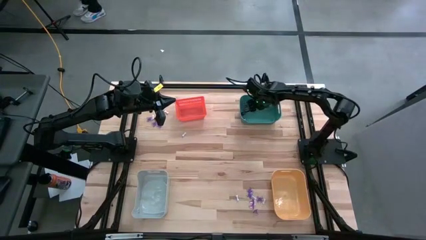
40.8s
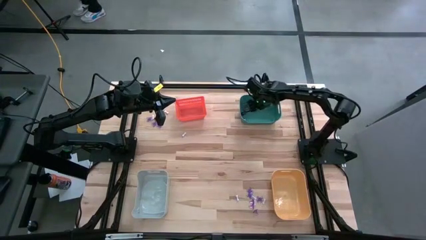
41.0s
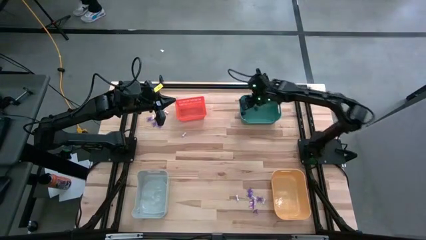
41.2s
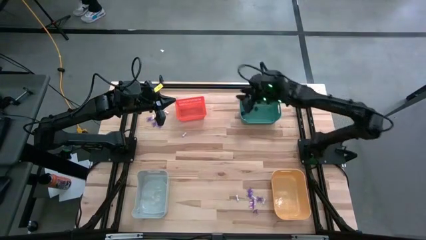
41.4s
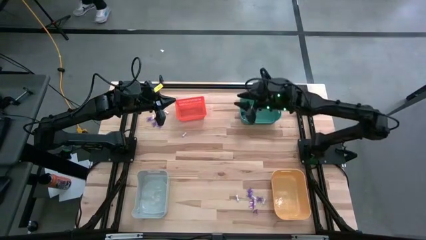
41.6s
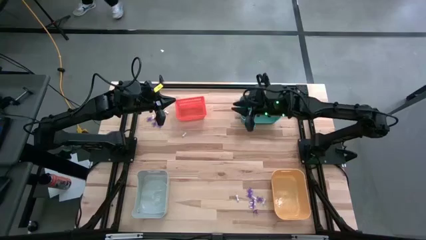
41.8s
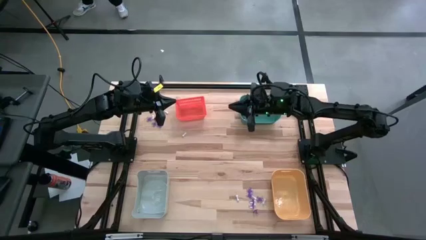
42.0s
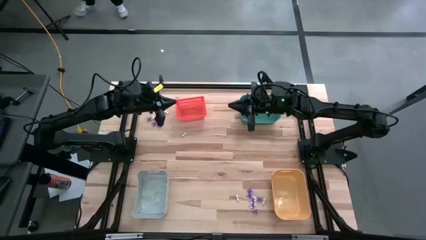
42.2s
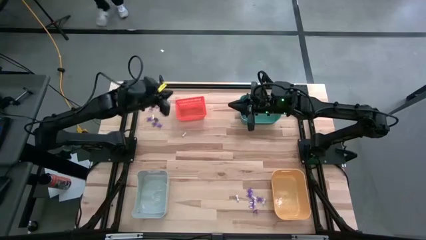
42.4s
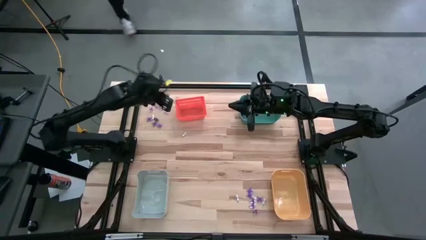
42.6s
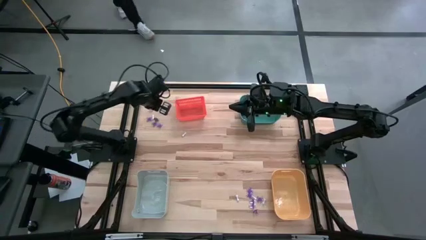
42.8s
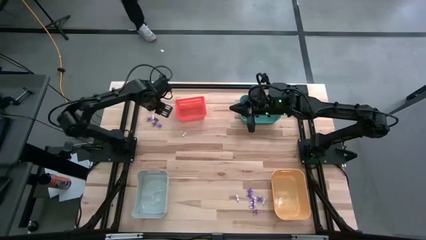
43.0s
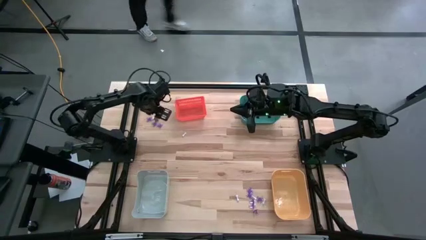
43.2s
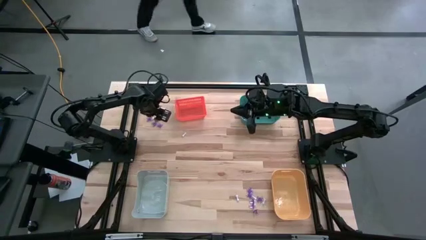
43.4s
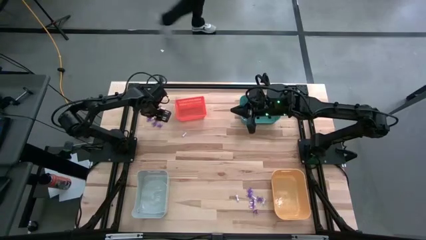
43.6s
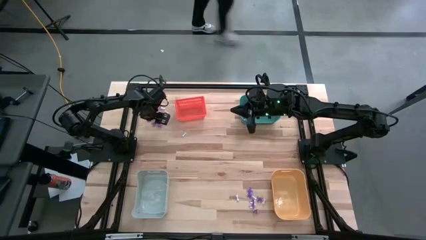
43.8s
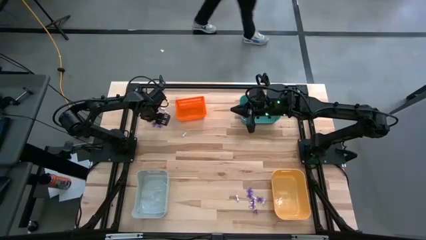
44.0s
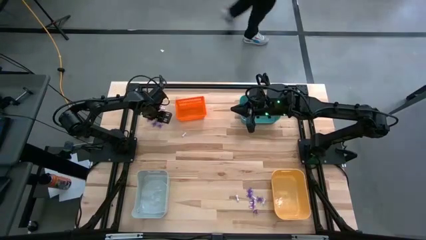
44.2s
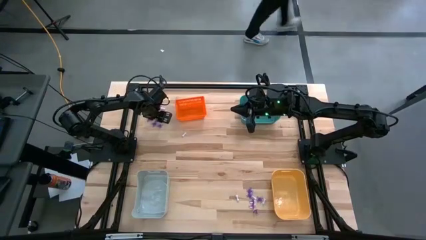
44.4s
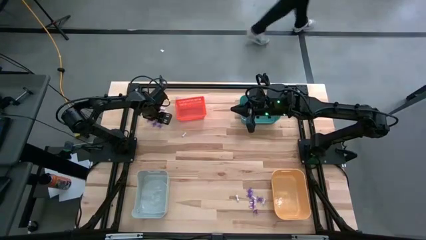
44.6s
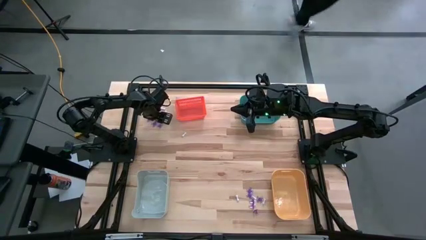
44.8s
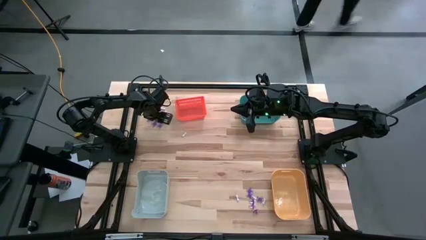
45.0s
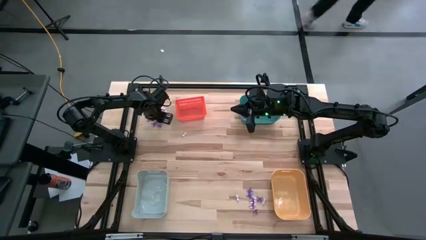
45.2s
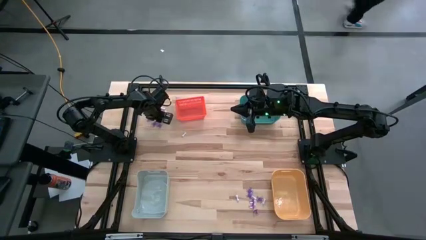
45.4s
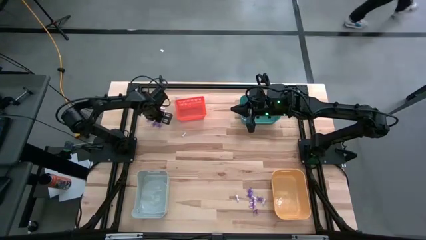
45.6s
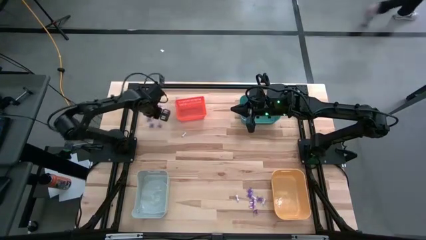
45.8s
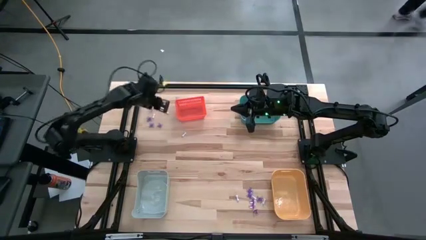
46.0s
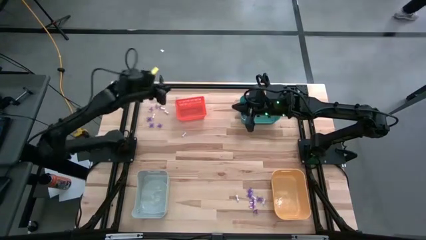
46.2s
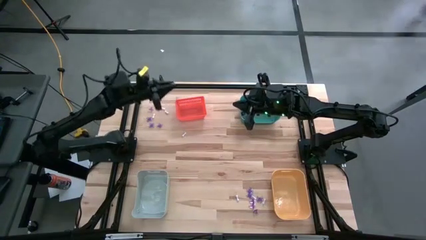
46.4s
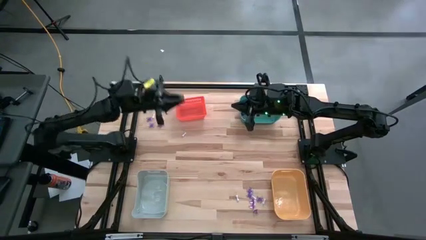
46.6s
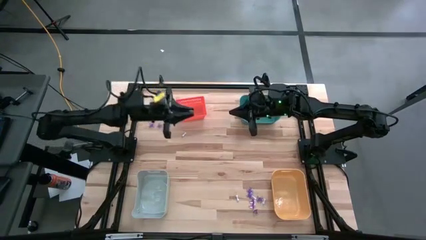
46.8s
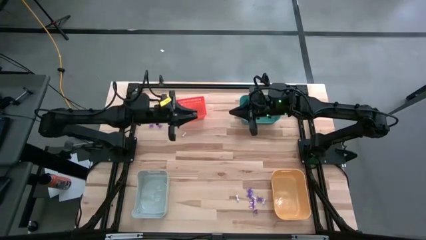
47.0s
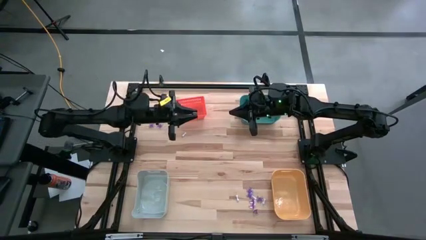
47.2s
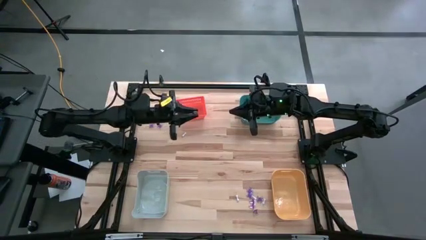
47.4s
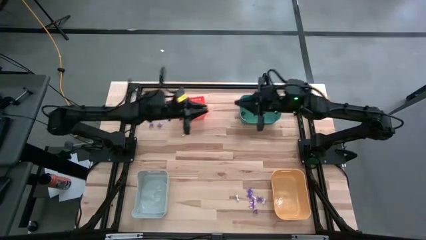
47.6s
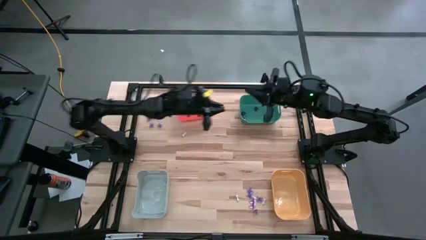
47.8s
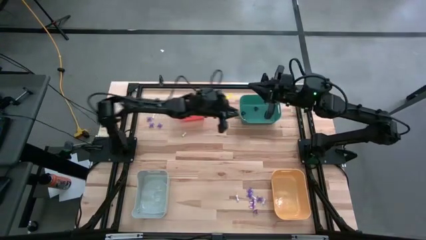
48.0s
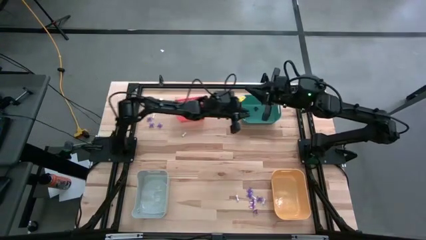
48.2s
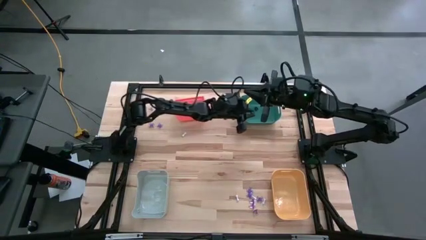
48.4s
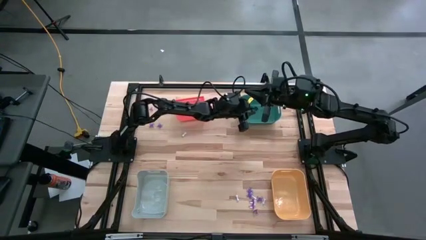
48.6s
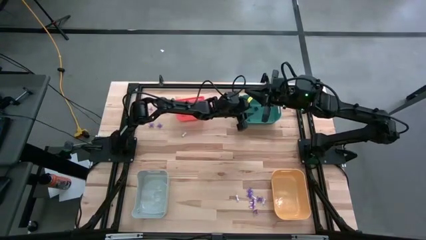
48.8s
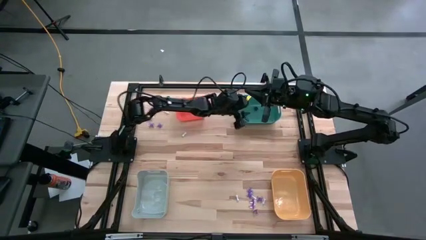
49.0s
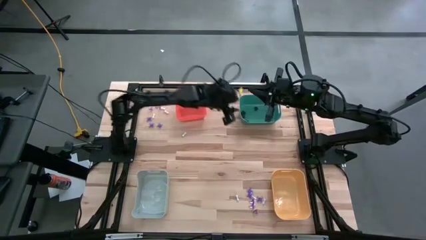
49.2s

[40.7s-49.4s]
Task: Sort Halloween decoration
Put the black skull toy into the green bin

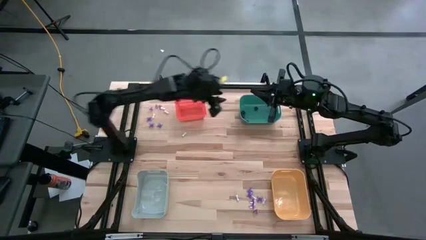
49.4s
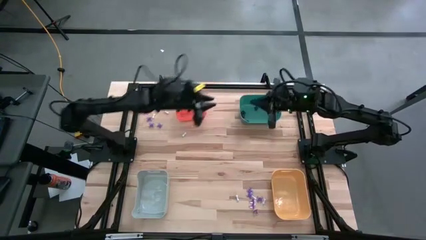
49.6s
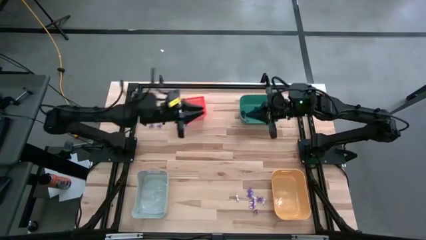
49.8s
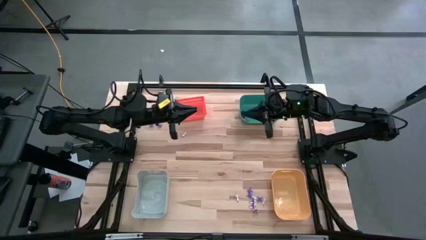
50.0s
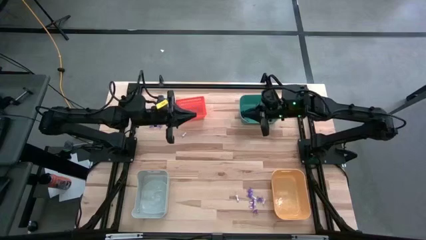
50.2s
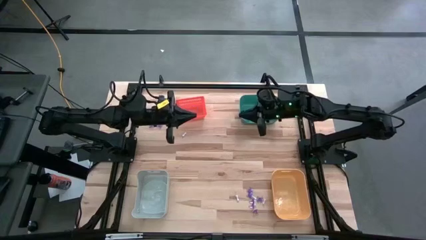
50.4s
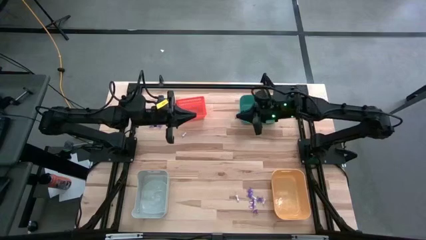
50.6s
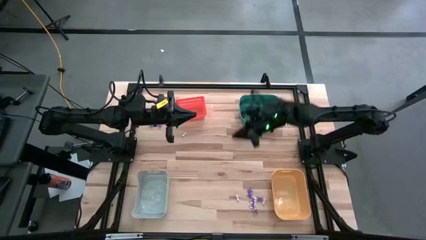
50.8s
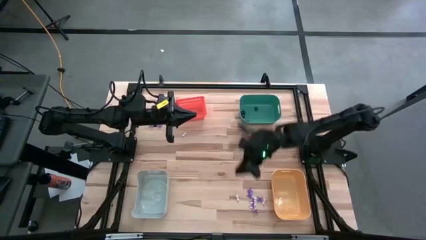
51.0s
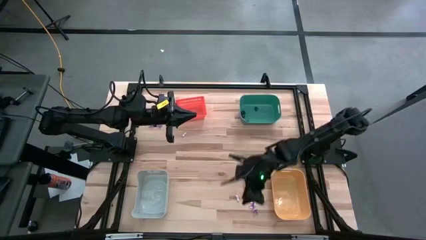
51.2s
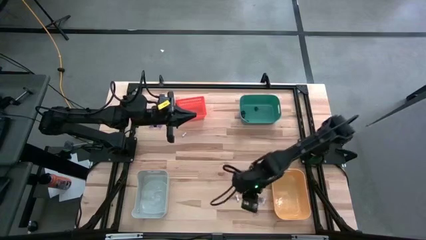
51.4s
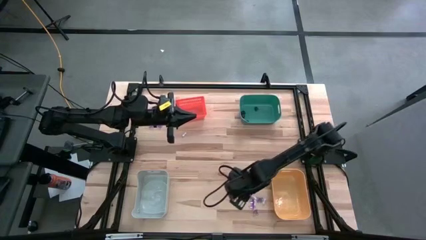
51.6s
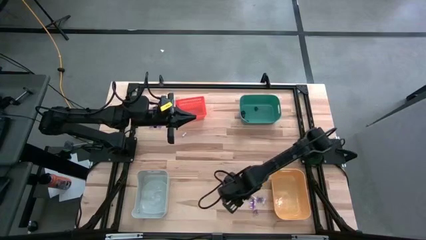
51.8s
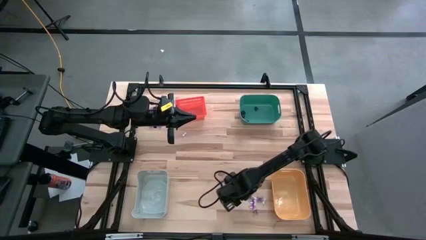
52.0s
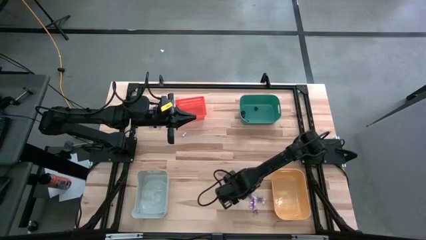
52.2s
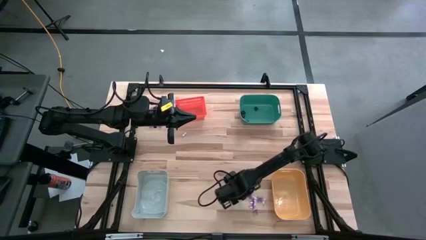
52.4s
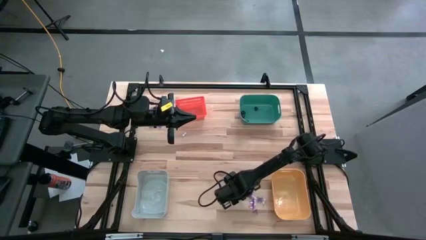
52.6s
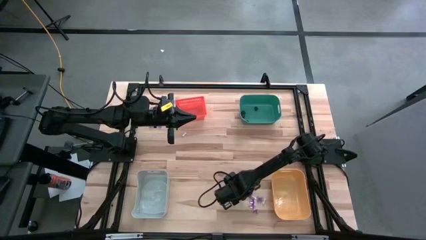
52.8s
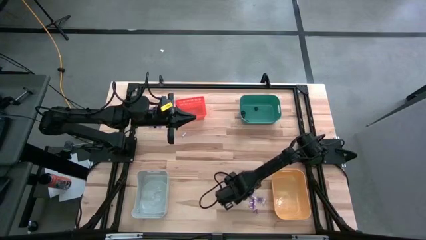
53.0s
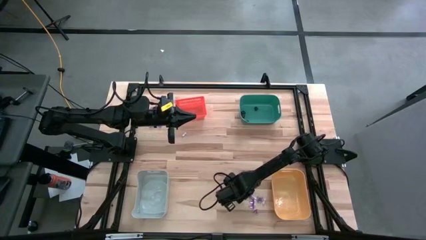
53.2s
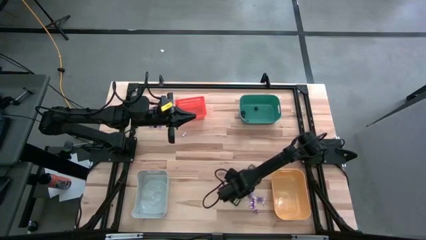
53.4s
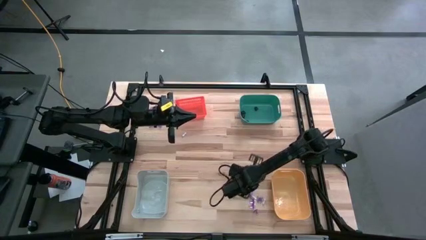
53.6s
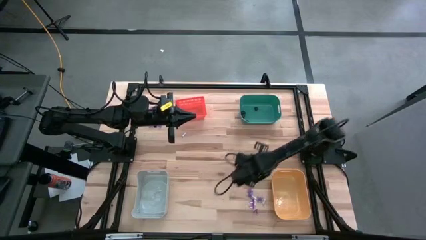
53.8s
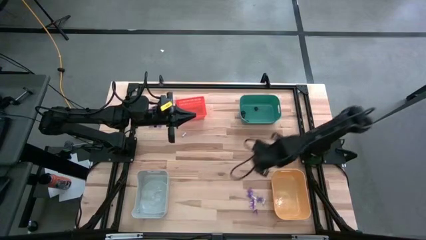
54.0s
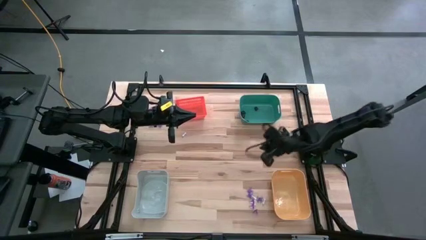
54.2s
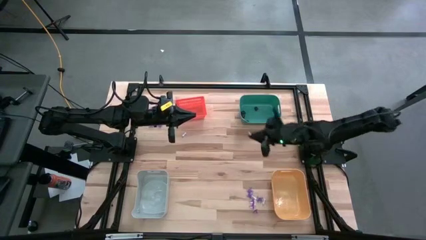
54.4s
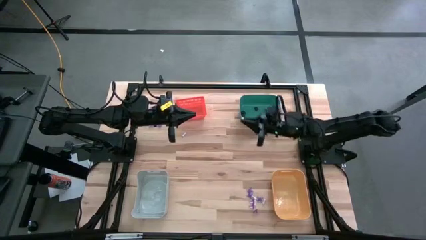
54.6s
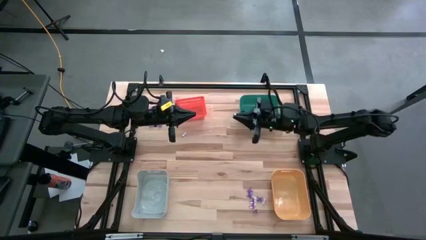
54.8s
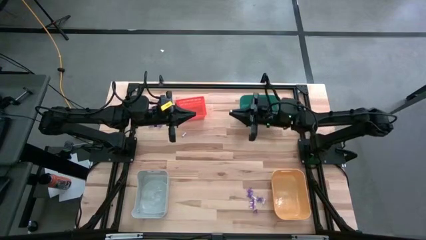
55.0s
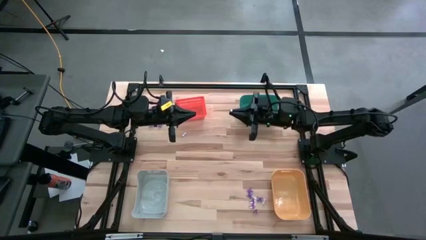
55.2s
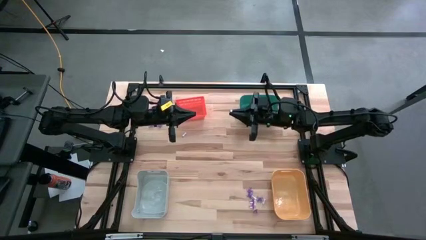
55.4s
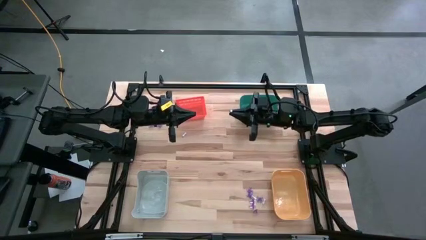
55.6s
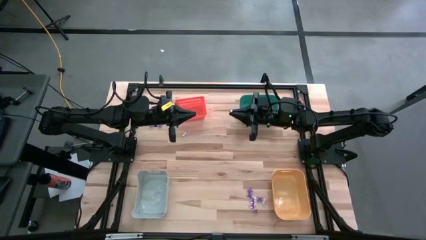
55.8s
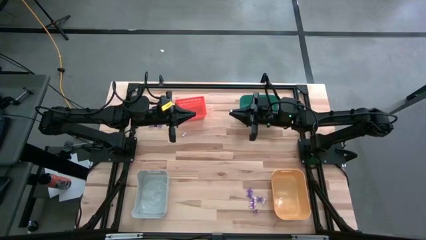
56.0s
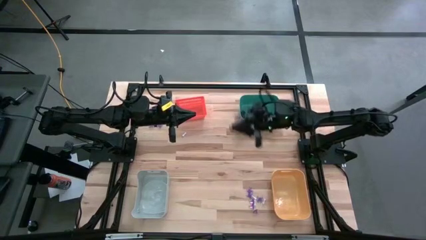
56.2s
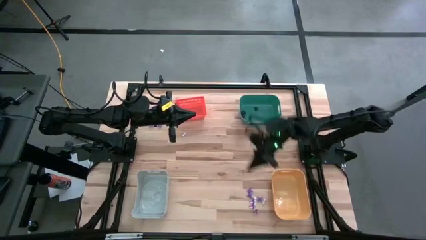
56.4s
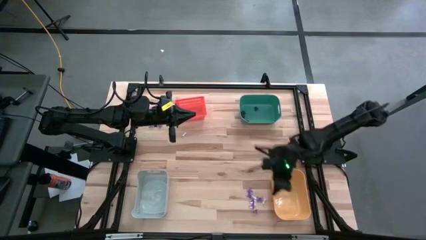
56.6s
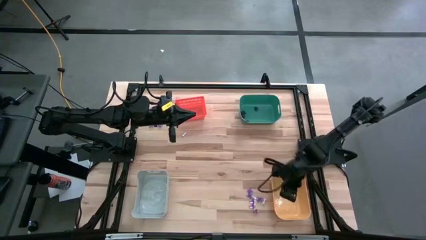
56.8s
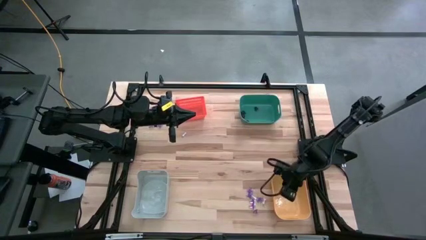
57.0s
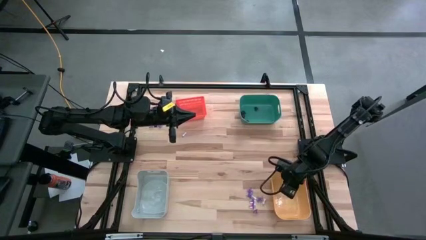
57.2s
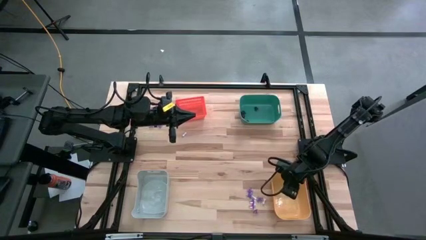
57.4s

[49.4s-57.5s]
Put the white bone toy into the yellow bin
